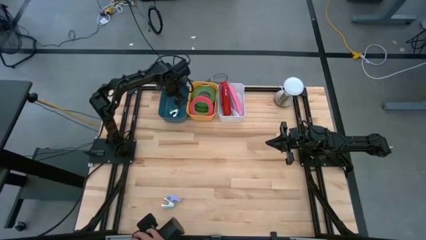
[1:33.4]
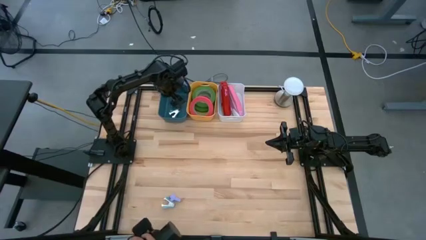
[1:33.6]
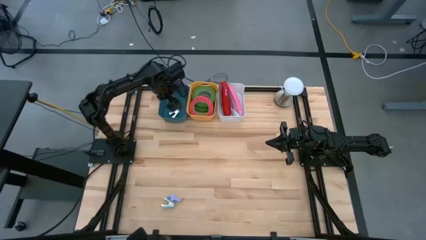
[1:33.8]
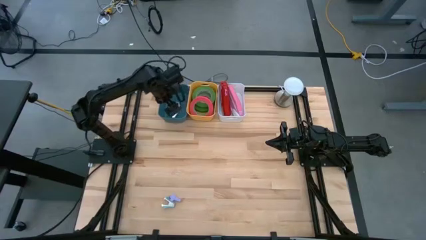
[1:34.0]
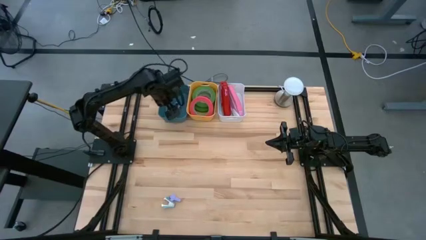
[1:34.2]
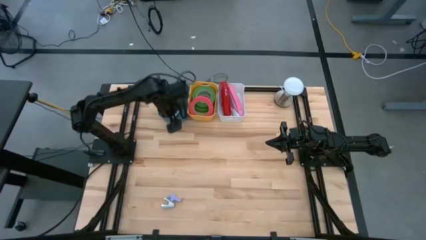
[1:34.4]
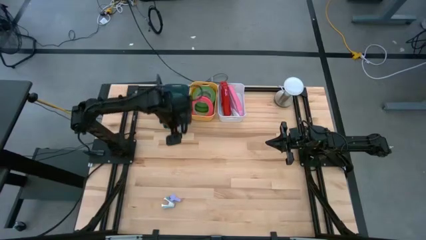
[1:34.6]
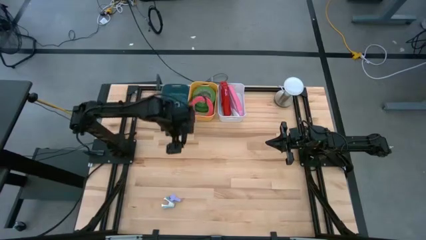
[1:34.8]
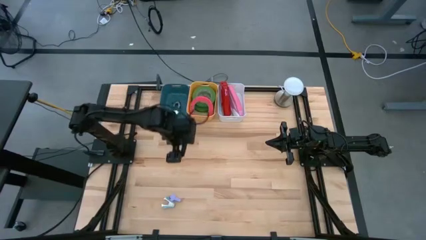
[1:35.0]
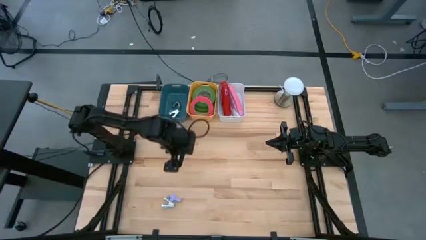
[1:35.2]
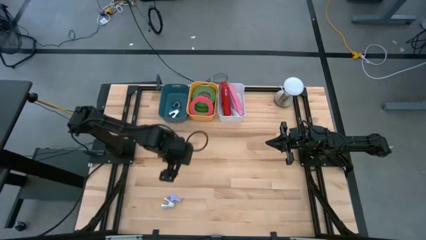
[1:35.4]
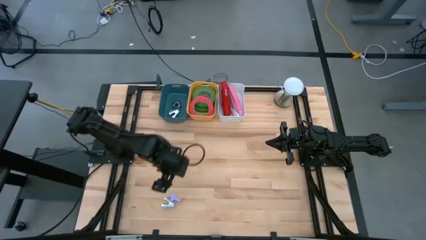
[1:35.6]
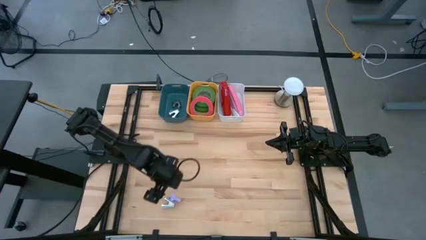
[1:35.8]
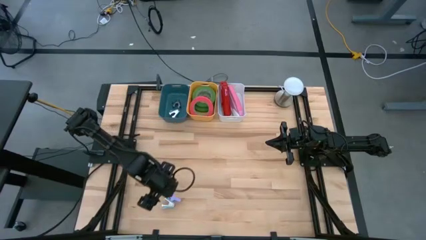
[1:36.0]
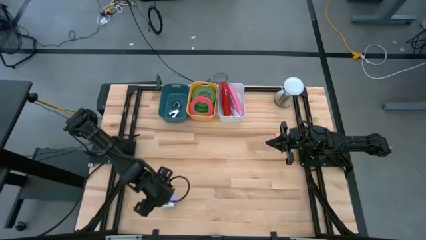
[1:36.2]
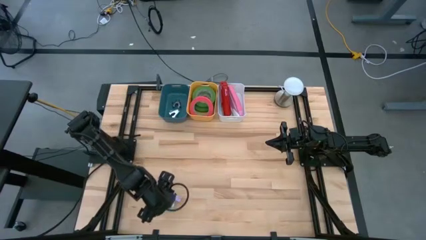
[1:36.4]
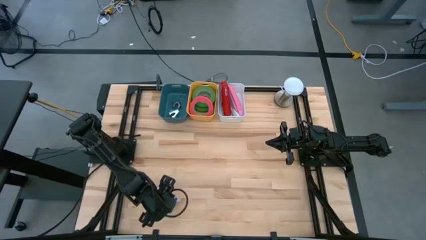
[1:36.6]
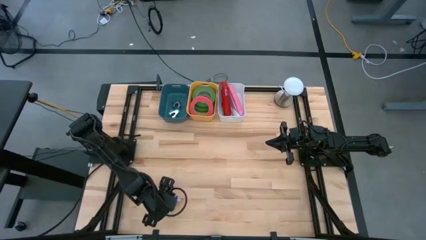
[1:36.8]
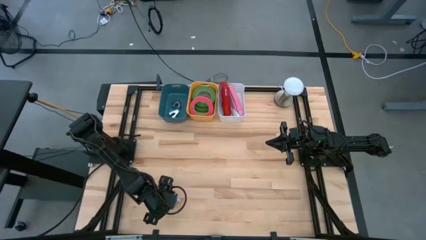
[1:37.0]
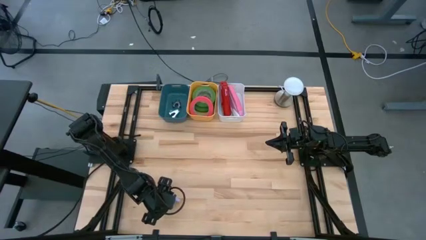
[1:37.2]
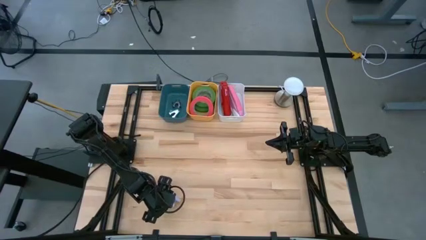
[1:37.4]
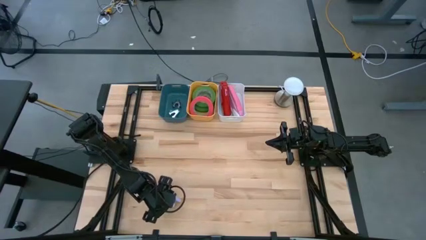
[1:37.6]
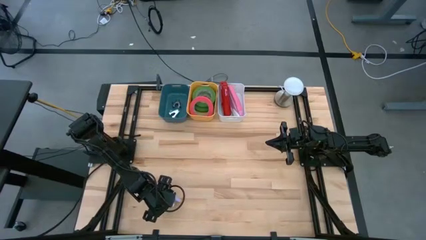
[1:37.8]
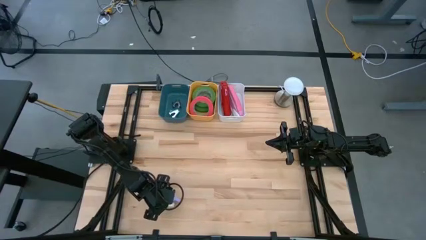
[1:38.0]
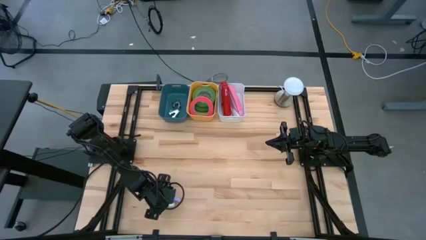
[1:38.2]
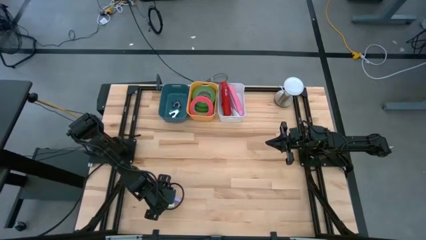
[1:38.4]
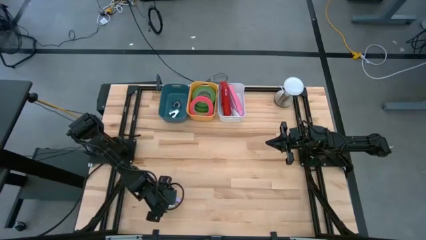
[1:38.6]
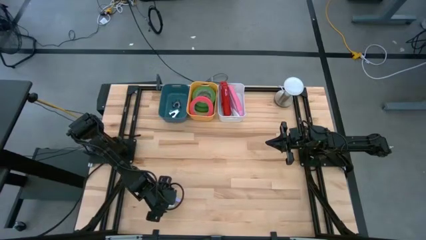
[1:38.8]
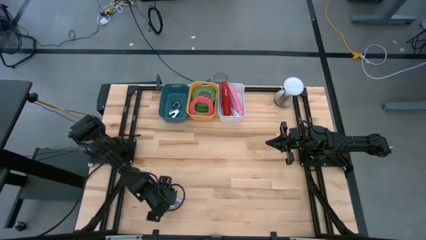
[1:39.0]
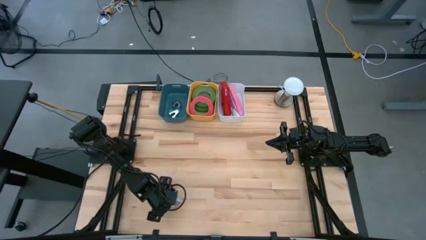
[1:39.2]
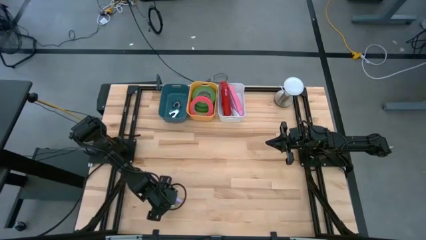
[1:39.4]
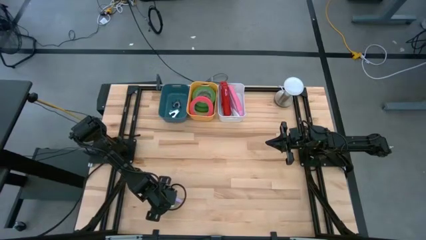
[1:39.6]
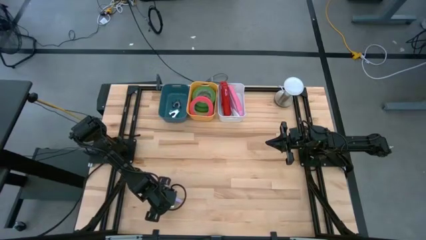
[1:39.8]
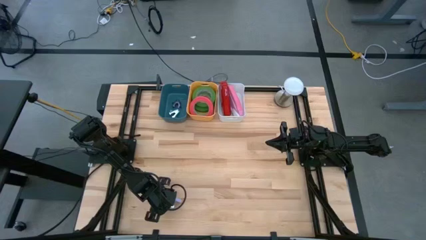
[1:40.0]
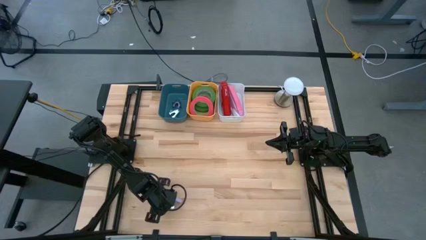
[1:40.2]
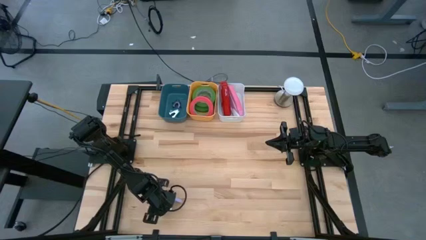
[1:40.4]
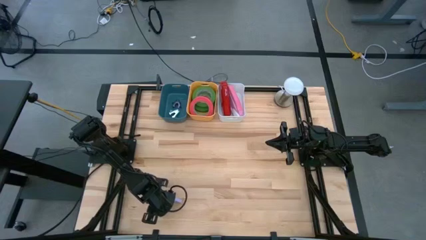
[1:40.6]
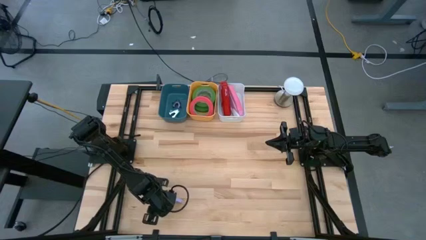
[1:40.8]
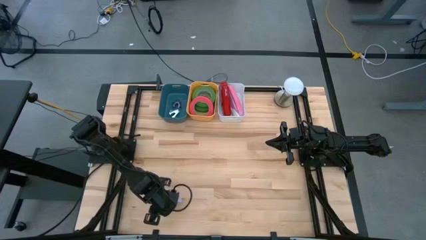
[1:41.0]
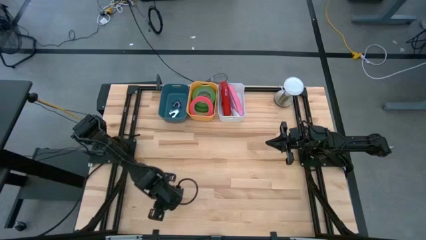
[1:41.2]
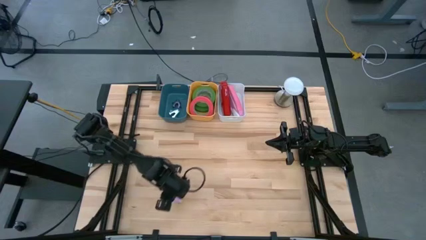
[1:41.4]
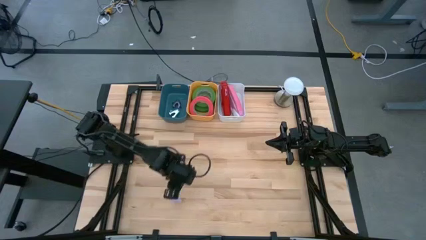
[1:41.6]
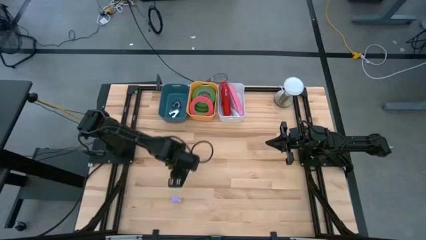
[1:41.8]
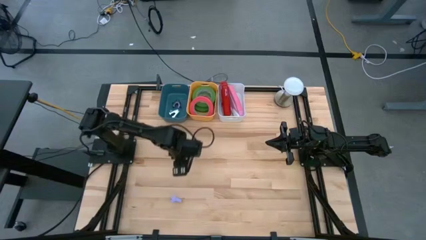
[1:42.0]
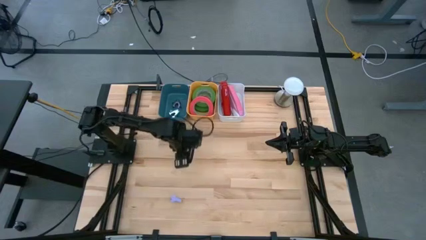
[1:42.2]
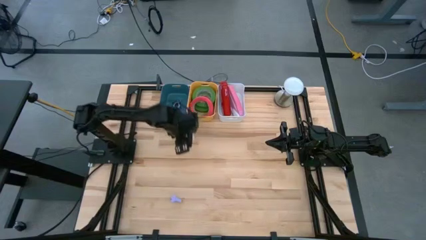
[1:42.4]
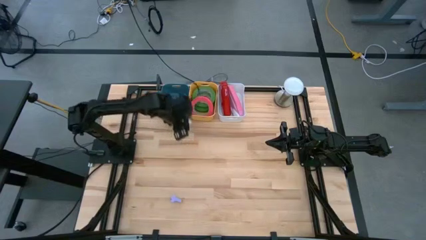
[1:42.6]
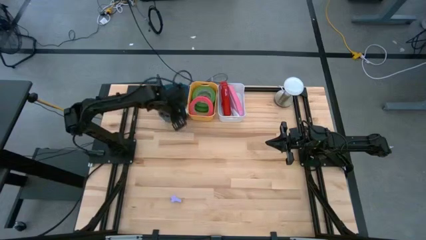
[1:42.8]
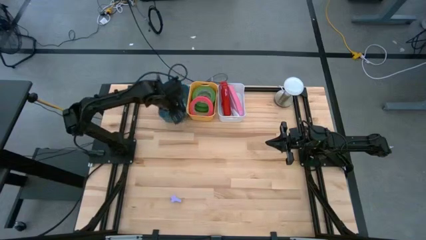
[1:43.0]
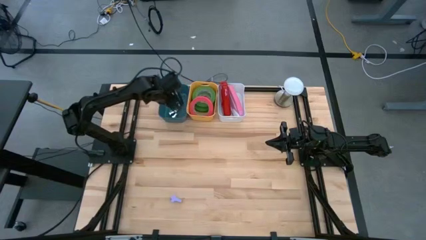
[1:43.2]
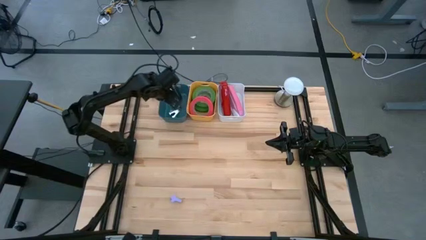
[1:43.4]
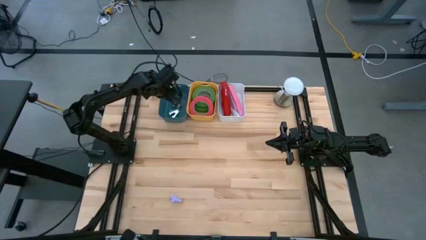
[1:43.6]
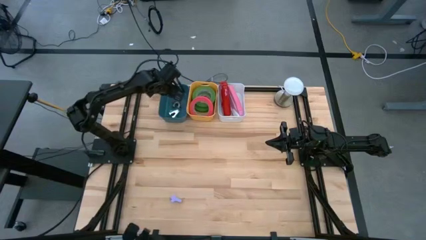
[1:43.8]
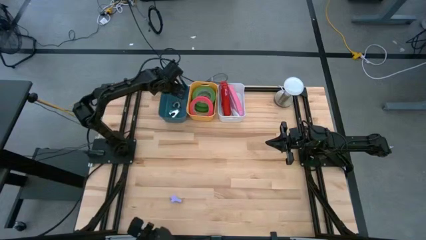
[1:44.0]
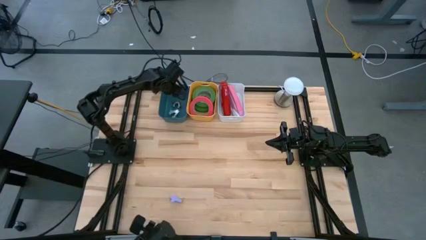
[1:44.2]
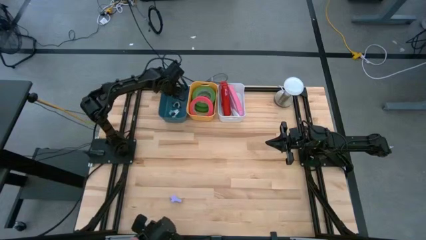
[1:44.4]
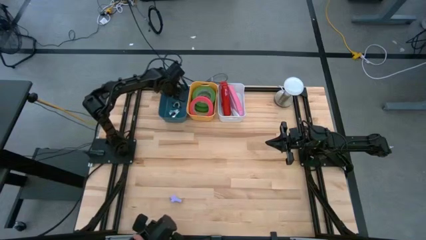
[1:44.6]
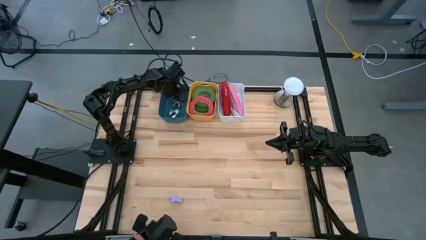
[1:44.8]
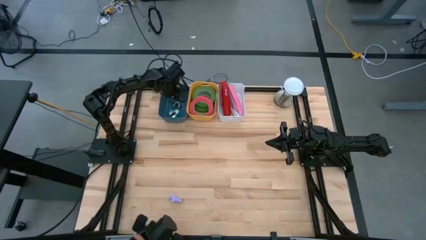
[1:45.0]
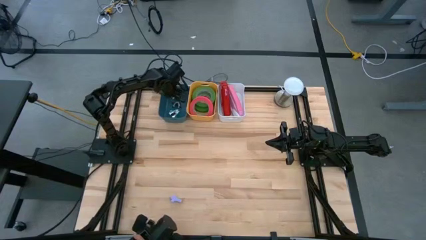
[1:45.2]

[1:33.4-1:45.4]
Task: Pick and place Stapler, Stapler remover, tape
Put the blue staple remover into the blue bin

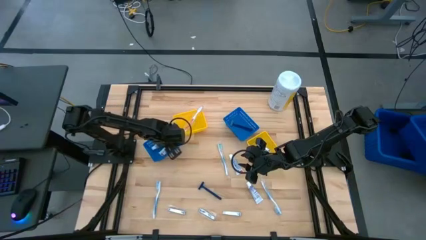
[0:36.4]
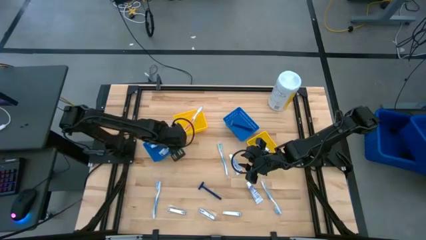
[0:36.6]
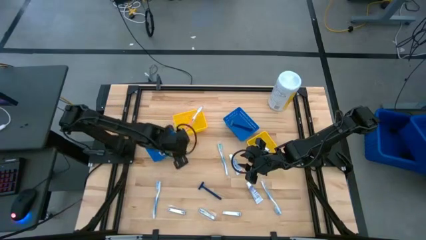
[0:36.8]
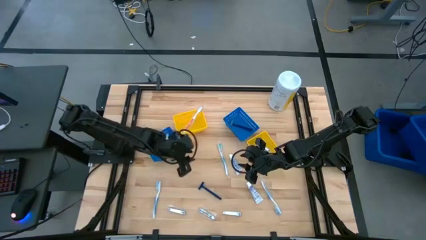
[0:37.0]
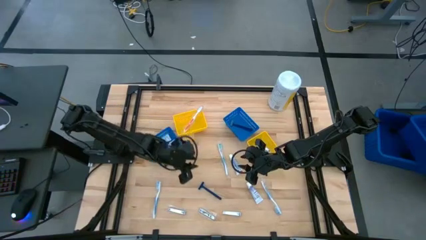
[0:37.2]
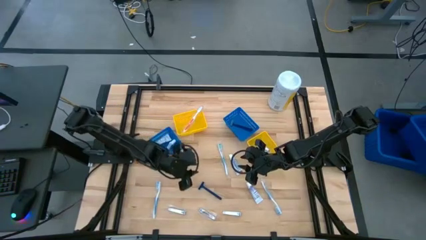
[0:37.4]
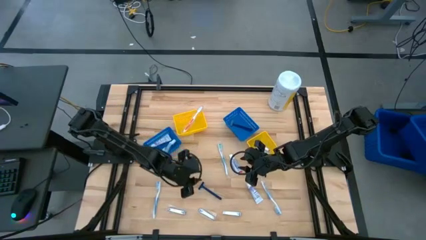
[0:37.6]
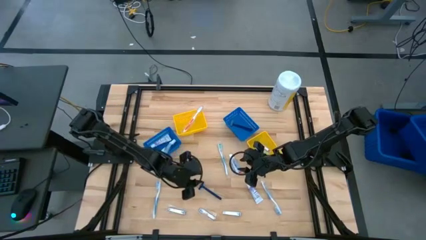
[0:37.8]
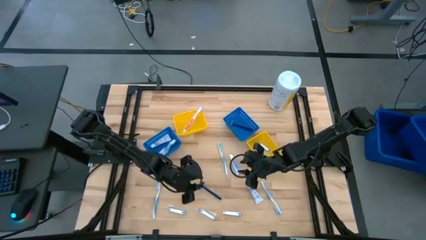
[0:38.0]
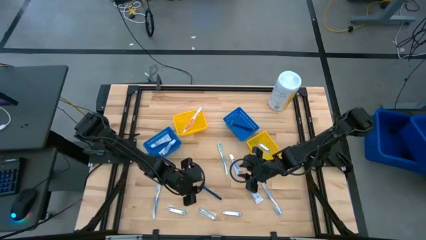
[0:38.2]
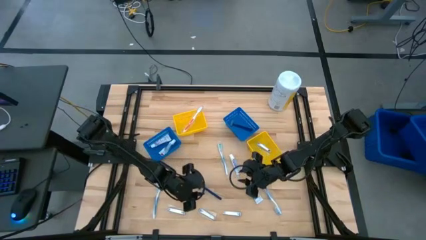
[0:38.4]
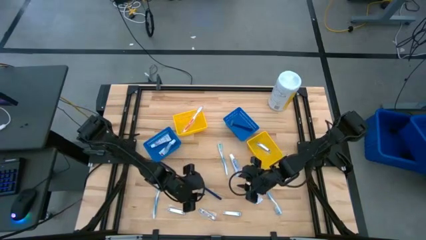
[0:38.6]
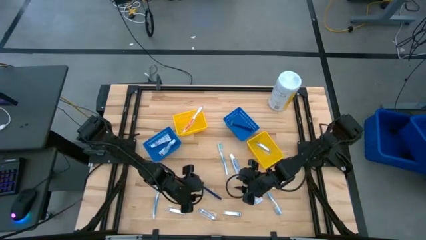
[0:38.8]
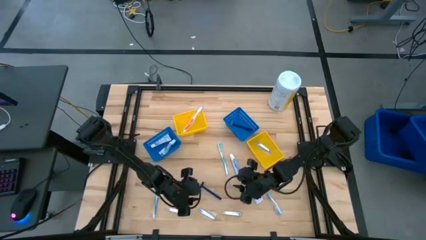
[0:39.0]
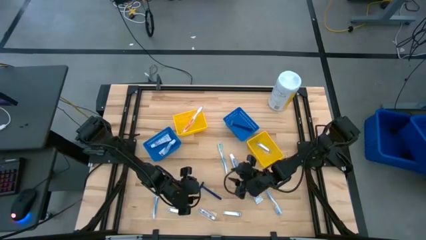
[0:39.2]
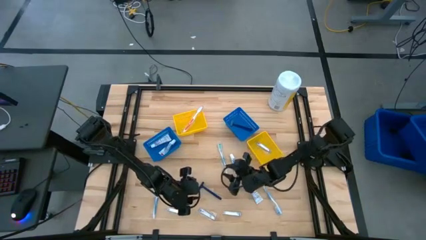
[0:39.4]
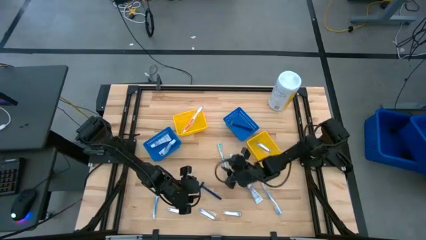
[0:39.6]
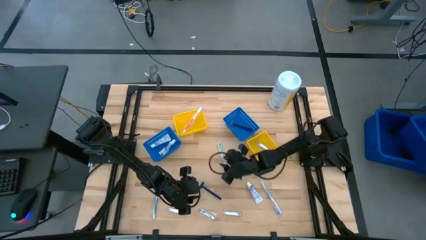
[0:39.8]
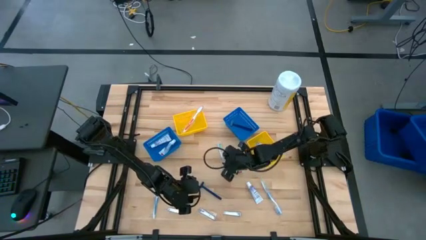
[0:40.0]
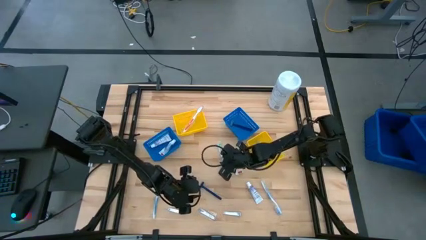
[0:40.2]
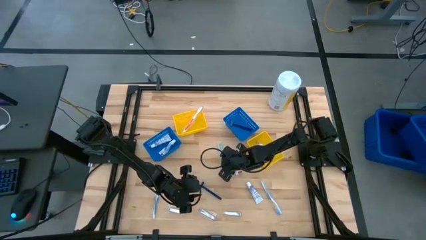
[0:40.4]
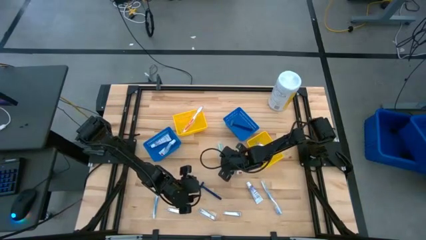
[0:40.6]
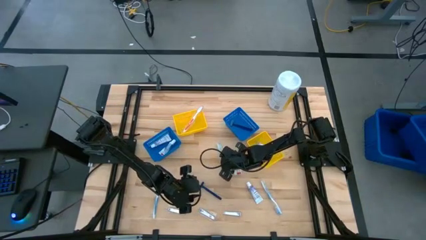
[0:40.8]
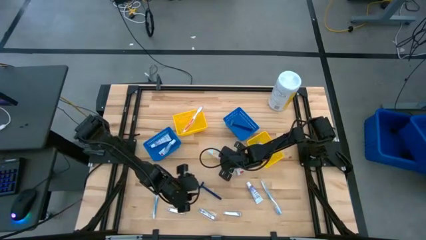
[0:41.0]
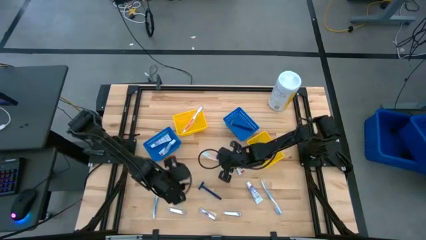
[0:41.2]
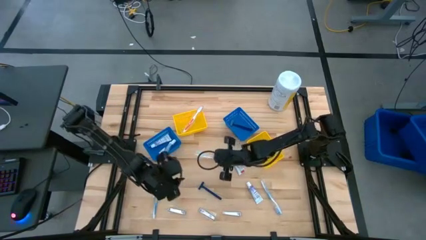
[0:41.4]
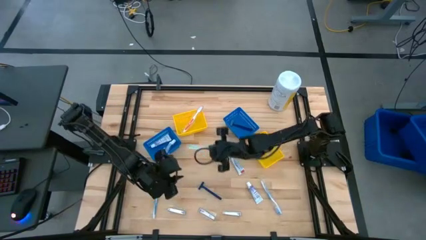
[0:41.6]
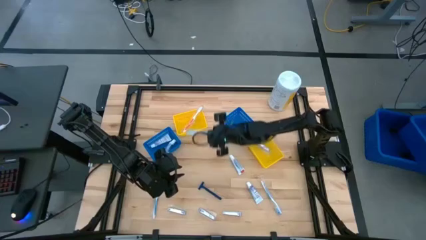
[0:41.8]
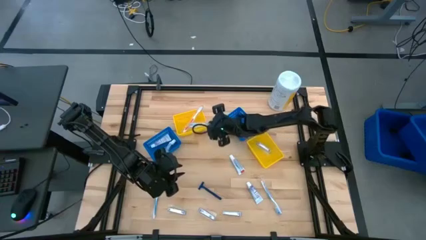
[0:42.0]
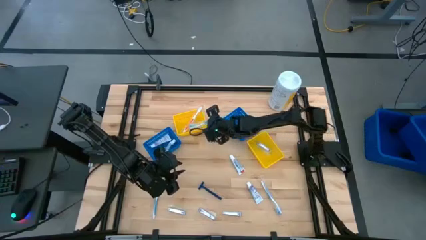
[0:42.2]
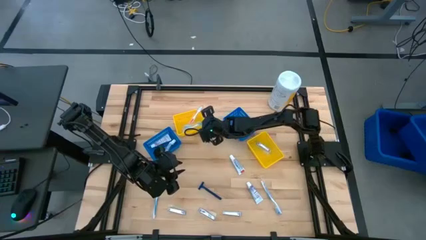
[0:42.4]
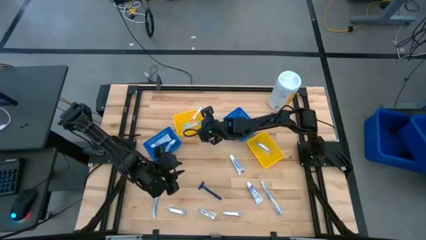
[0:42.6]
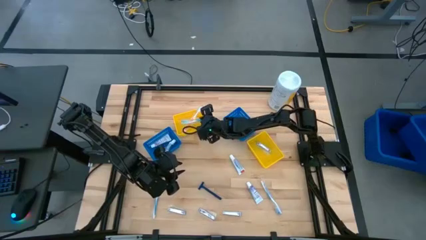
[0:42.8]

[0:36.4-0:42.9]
Task: Pick & Place Travel size toiletries
Put the green toothbrush into the left yellow bin
